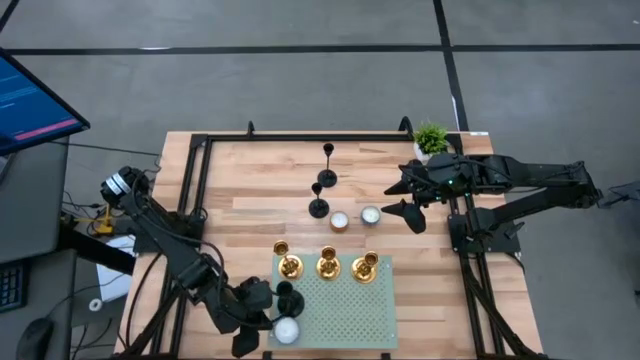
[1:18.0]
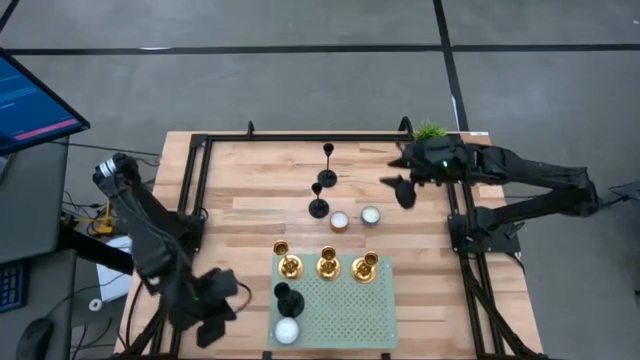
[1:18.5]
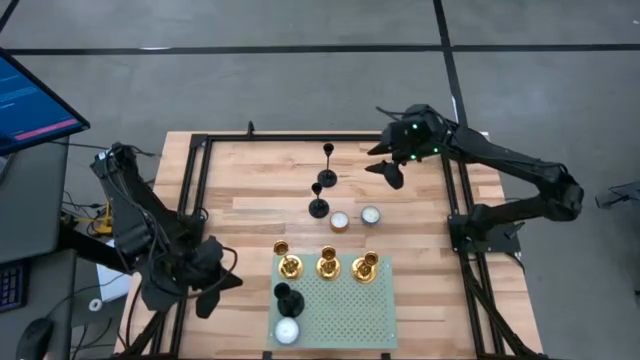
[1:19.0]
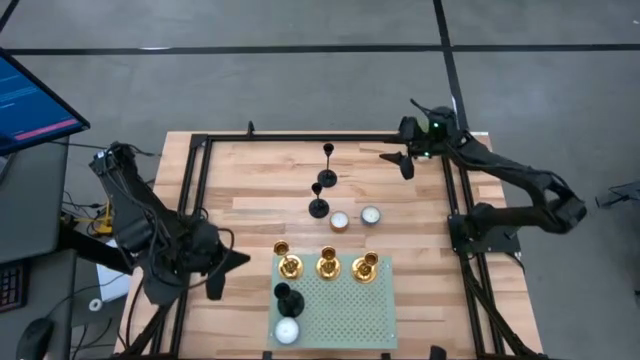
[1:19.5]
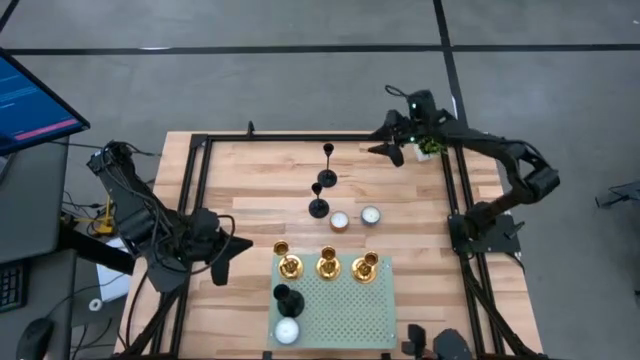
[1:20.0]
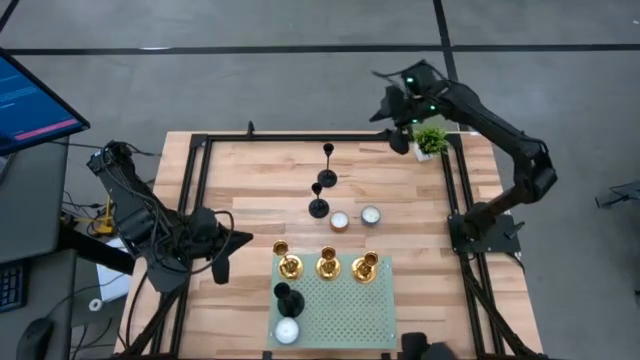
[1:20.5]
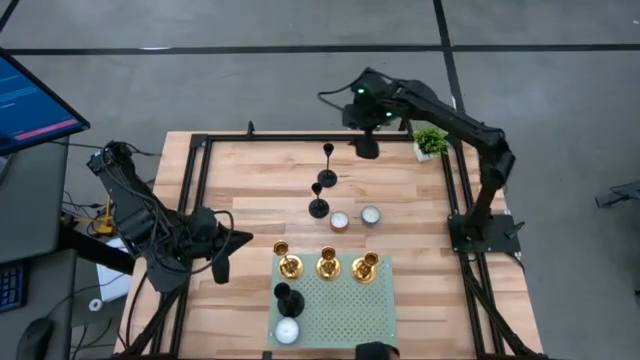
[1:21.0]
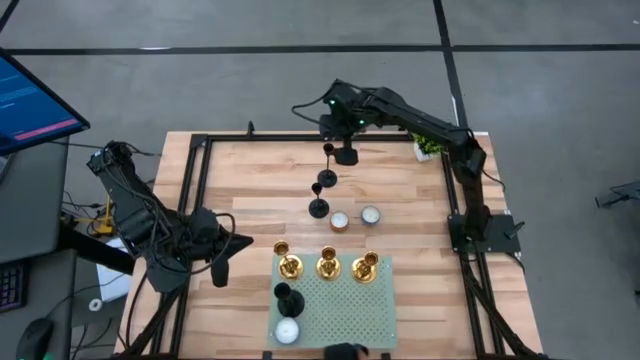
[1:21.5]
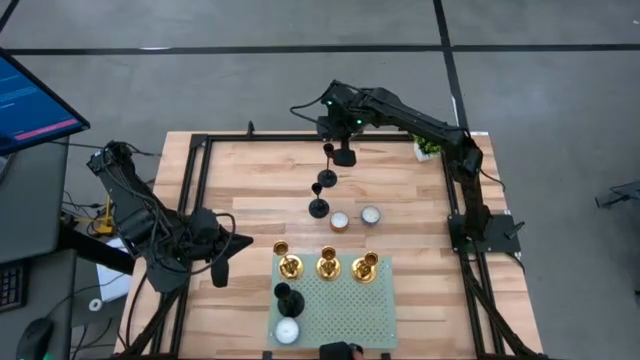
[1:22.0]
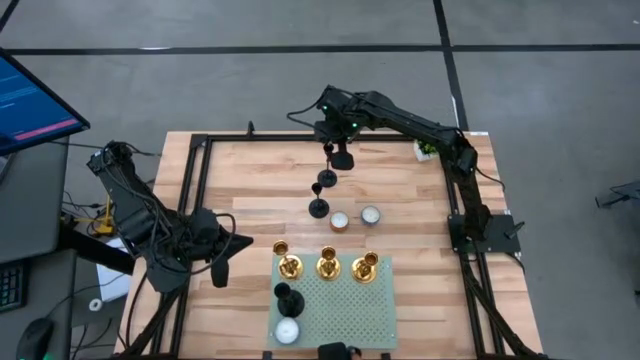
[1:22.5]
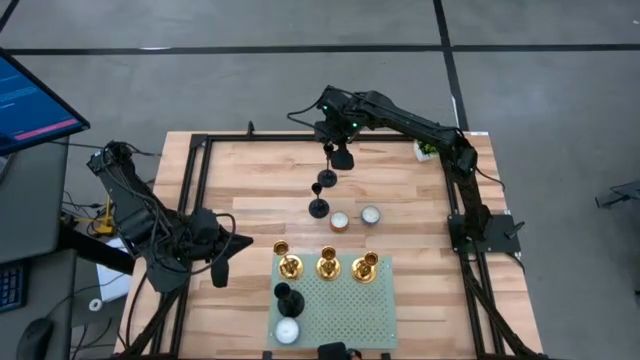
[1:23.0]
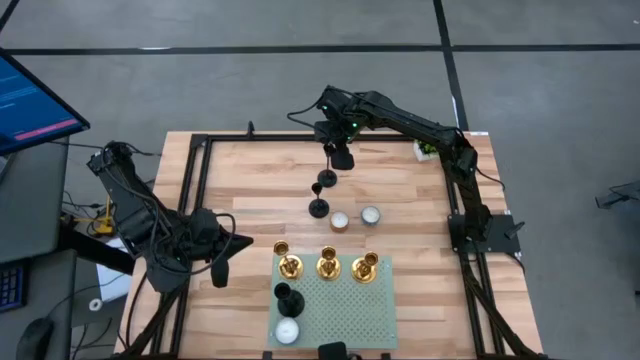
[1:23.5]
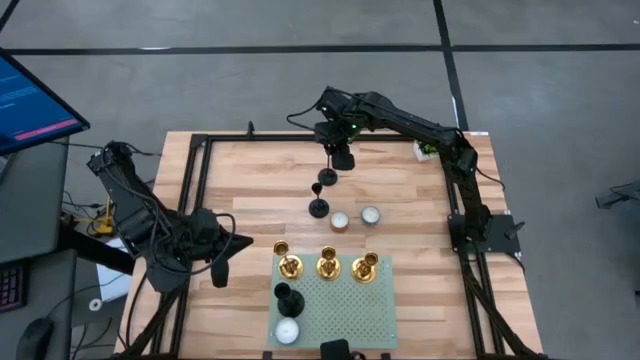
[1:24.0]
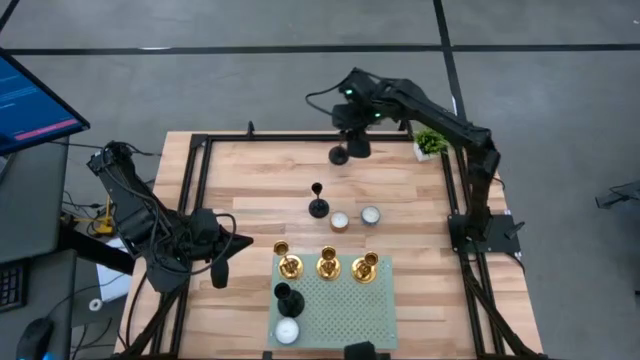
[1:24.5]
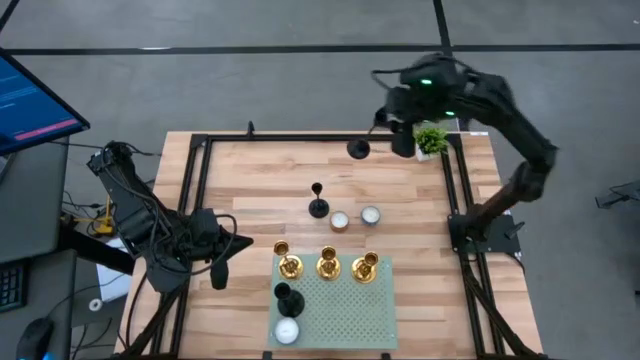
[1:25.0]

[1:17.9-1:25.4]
Task: Pick & Place candle stick holders
Put the top black candle holder on the shelf aligned with the other black candle holder

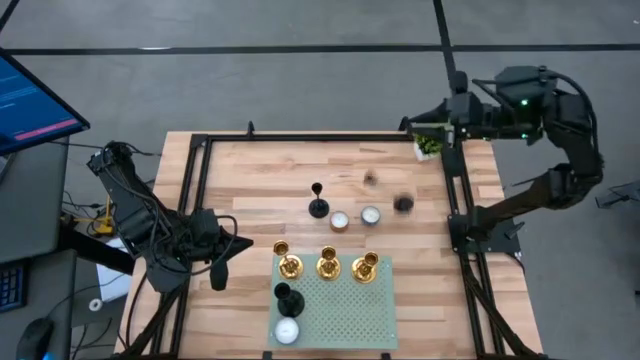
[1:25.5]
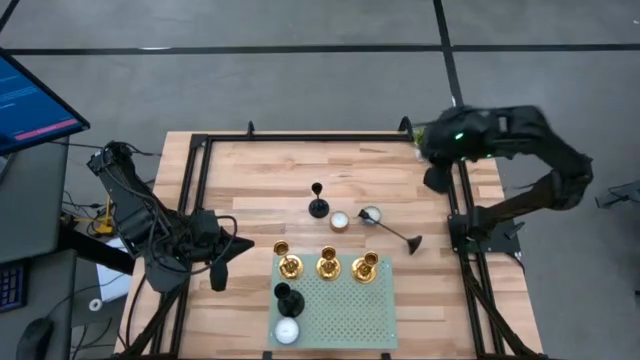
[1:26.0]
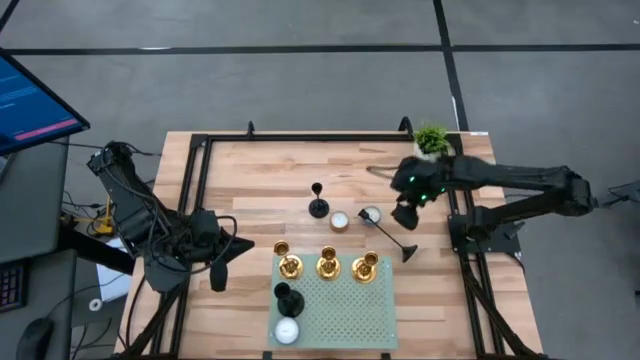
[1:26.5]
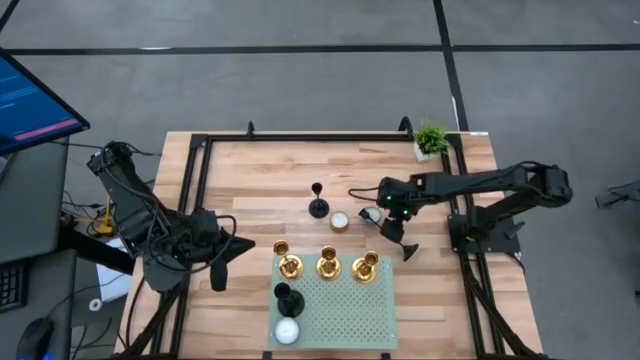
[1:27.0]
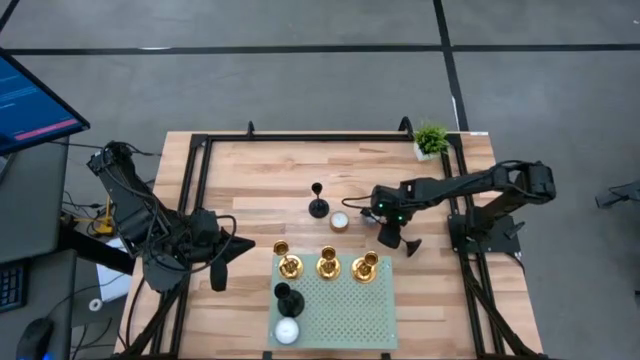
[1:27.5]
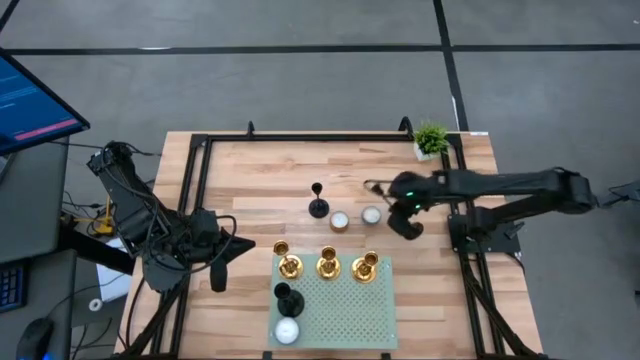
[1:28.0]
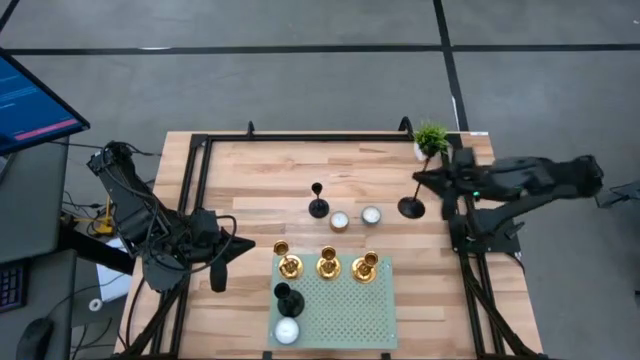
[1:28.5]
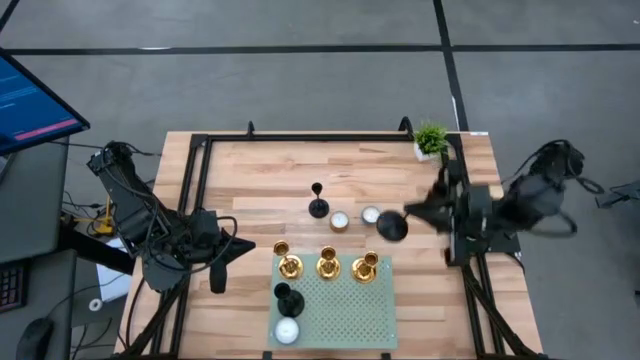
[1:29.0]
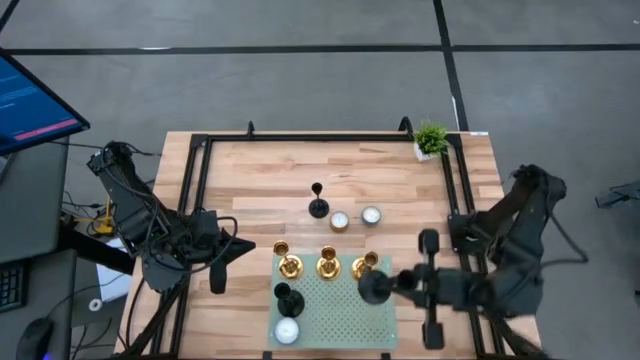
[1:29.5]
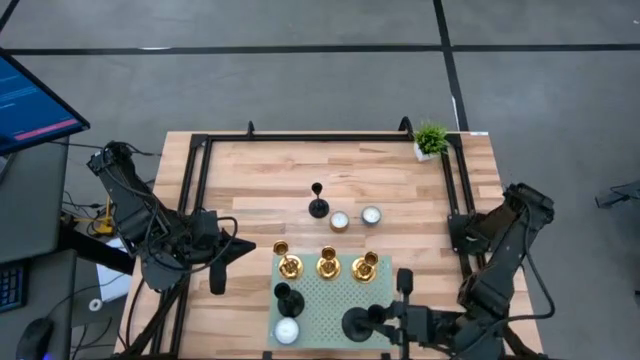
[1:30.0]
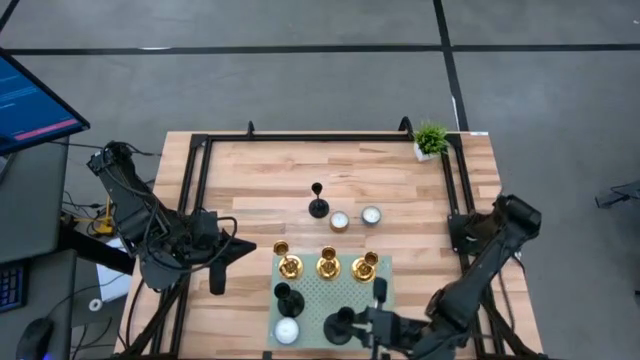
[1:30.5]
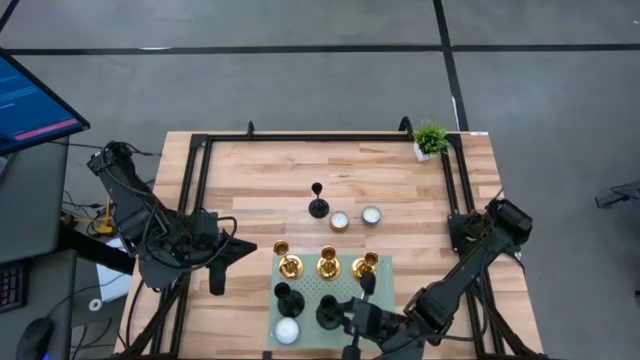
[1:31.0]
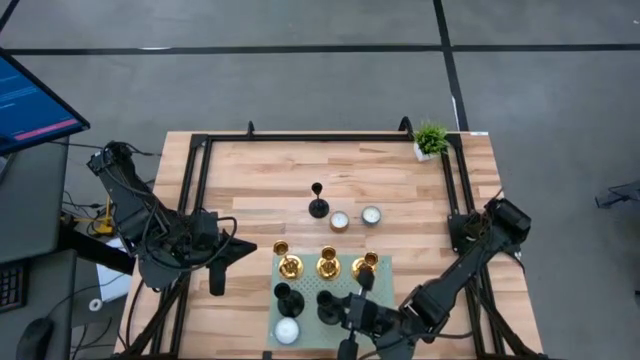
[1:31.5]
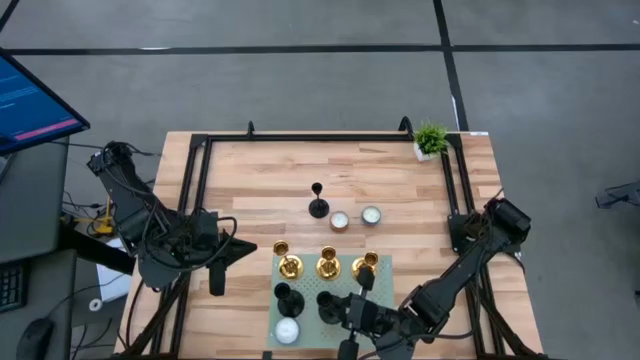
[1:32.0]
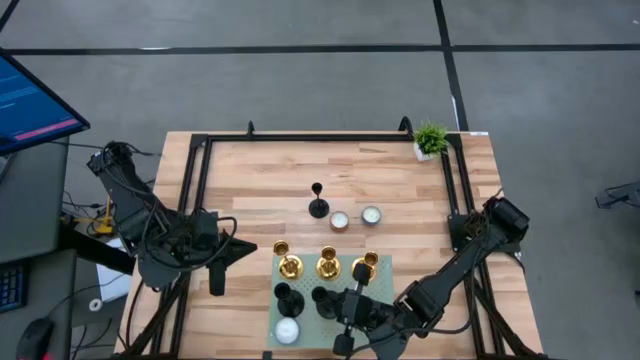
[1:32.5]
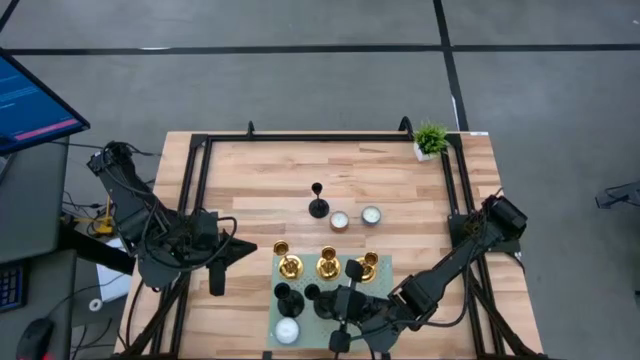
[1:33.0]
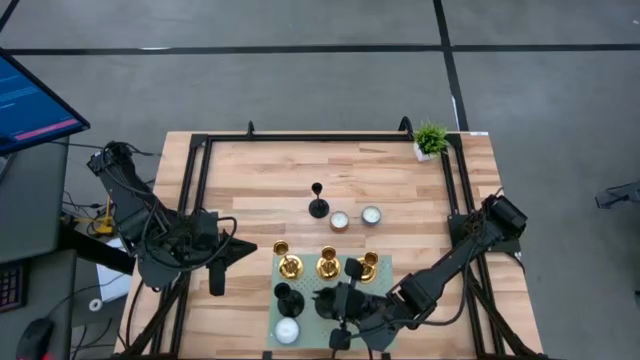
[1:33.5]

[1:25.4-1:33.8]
Put the top black candle holder on the shelf aligned with the other black candle holder

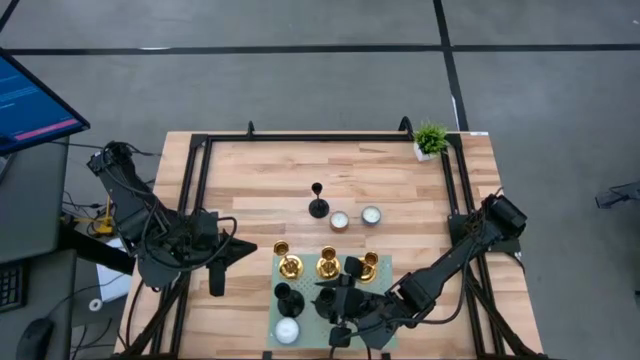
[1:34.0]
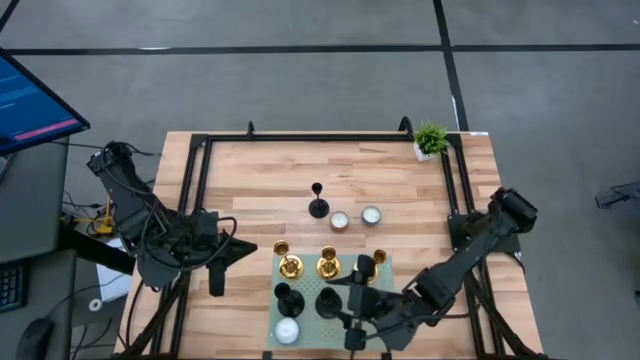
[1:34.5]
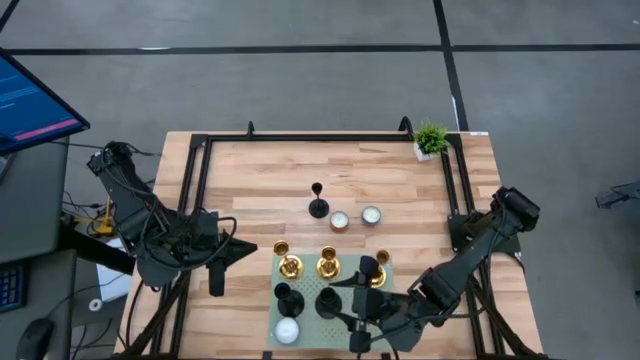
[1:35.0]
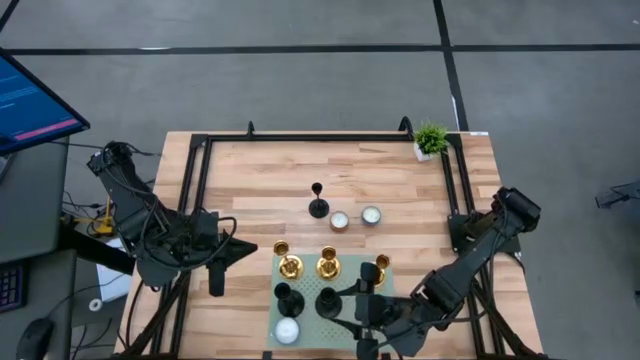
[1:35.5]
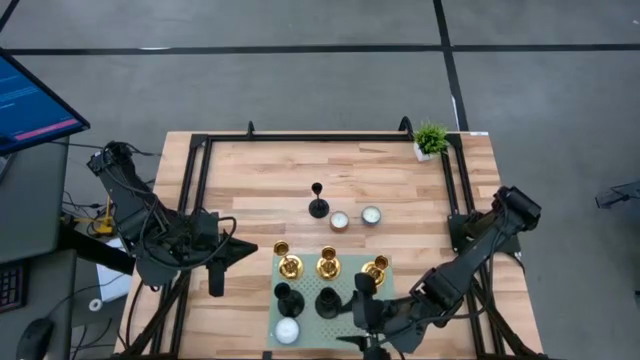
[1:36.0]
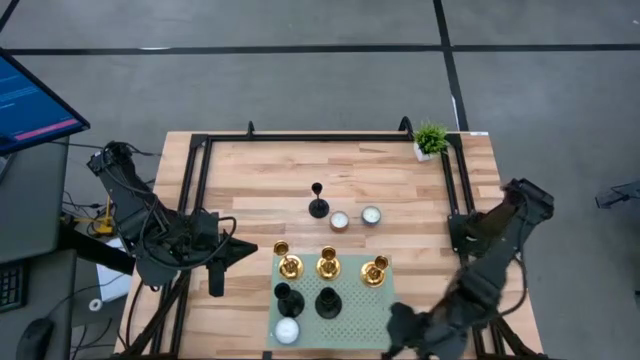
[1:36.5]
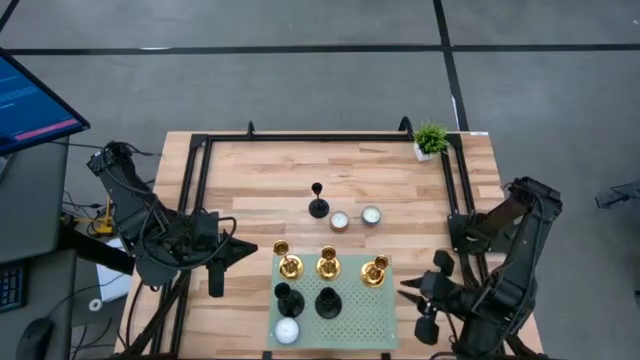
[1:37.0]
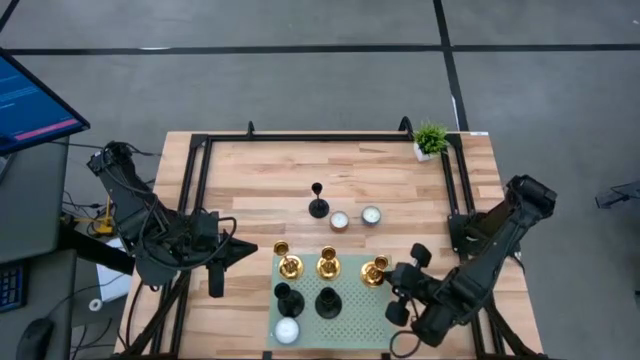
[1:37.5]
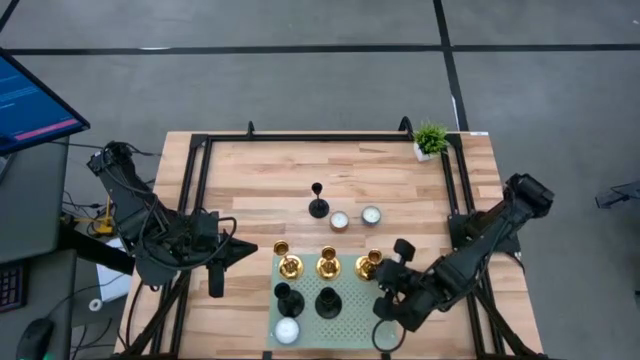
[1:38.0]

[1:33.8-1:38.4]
Adjust the gold candle holder on the shelf
